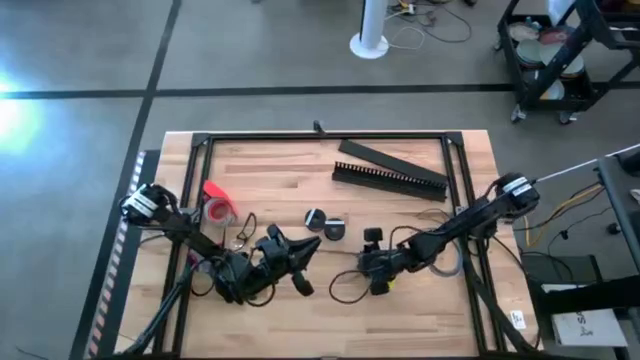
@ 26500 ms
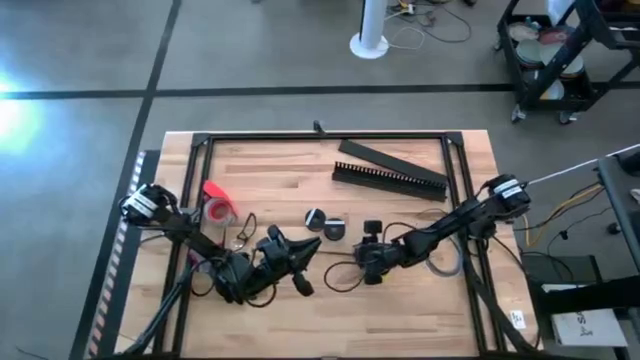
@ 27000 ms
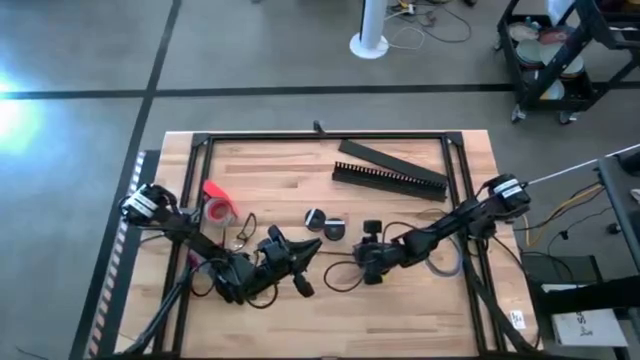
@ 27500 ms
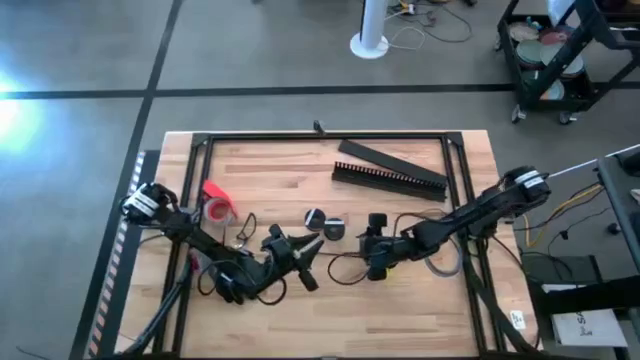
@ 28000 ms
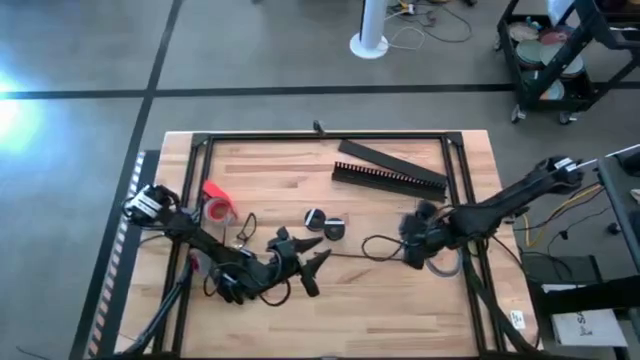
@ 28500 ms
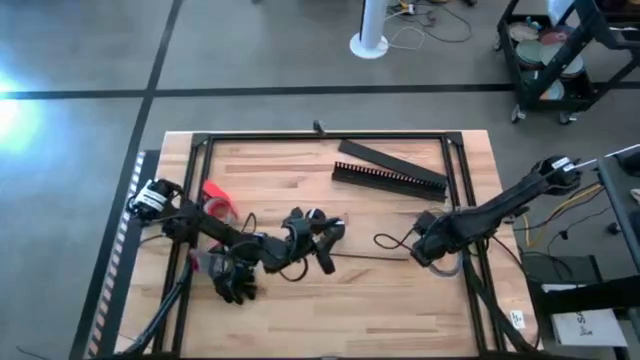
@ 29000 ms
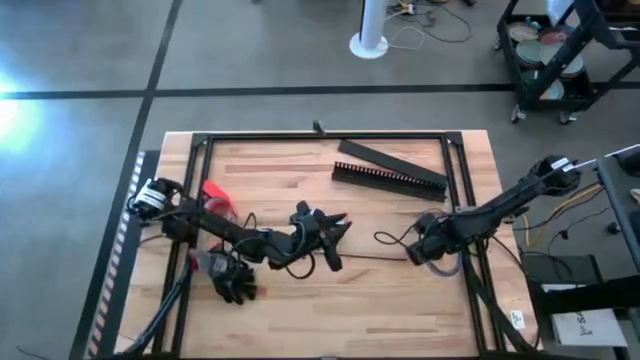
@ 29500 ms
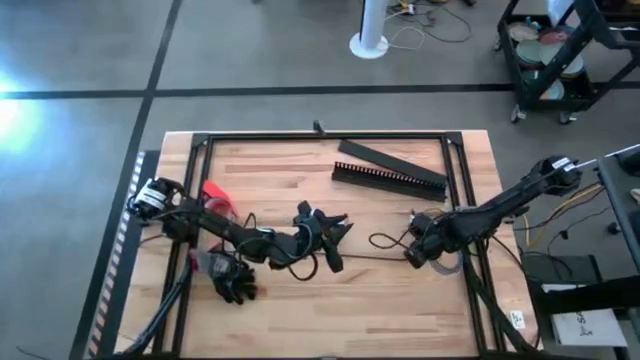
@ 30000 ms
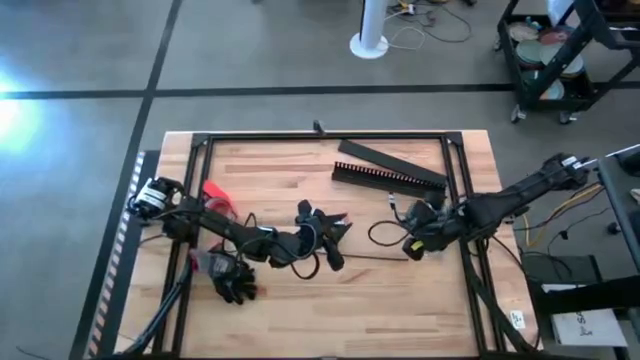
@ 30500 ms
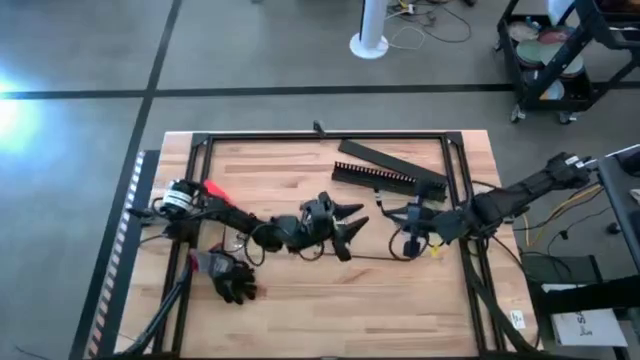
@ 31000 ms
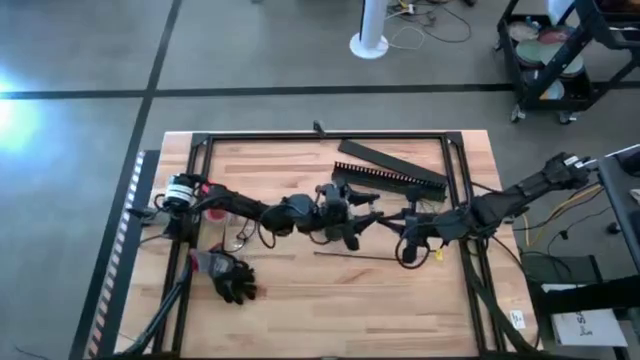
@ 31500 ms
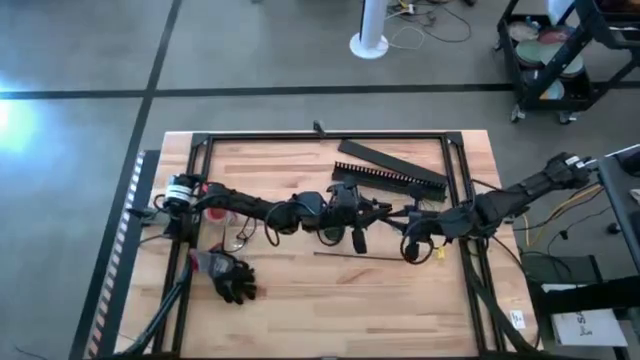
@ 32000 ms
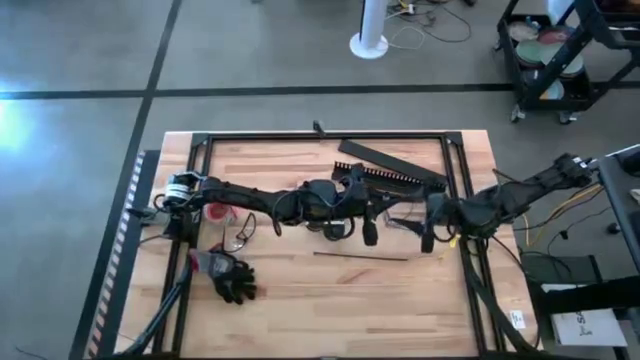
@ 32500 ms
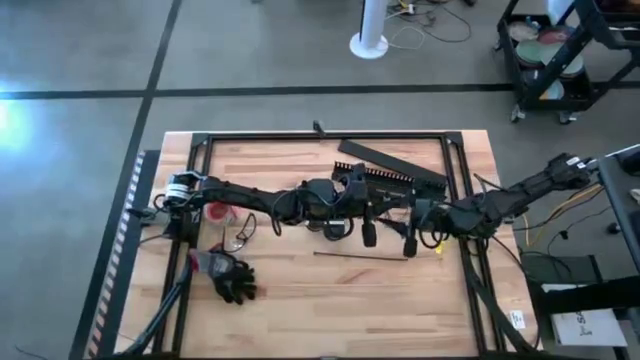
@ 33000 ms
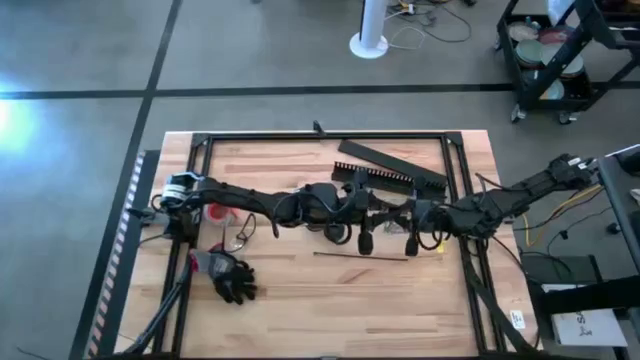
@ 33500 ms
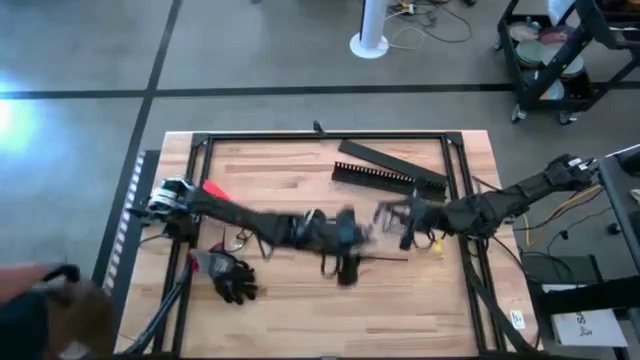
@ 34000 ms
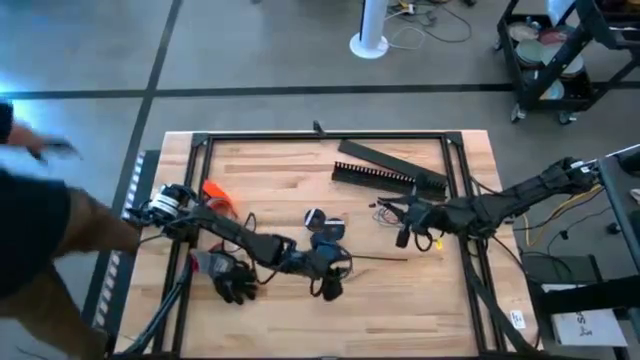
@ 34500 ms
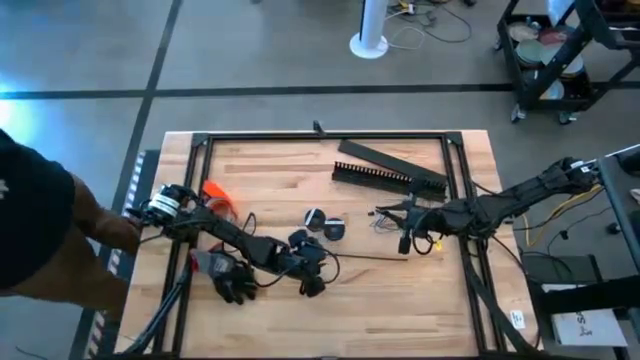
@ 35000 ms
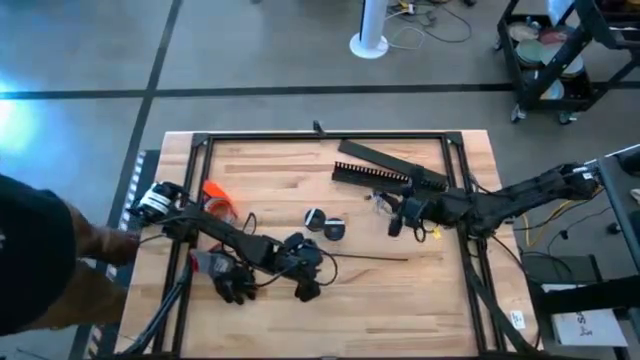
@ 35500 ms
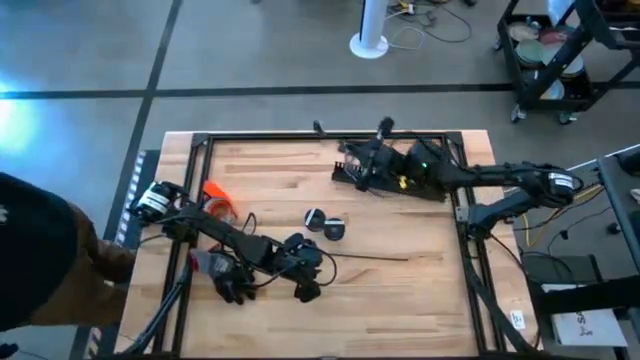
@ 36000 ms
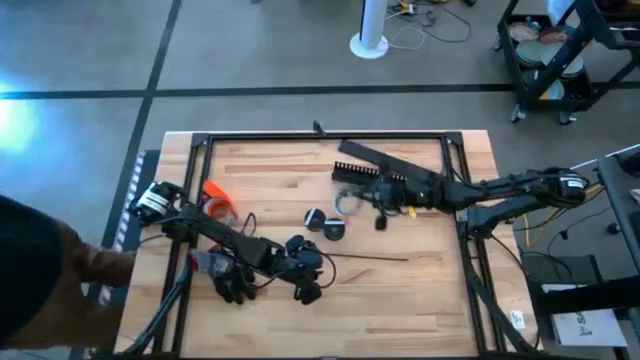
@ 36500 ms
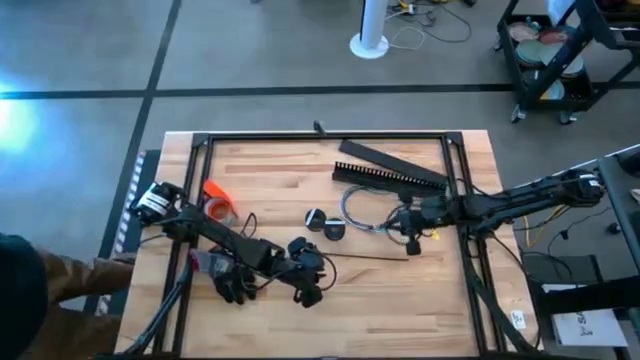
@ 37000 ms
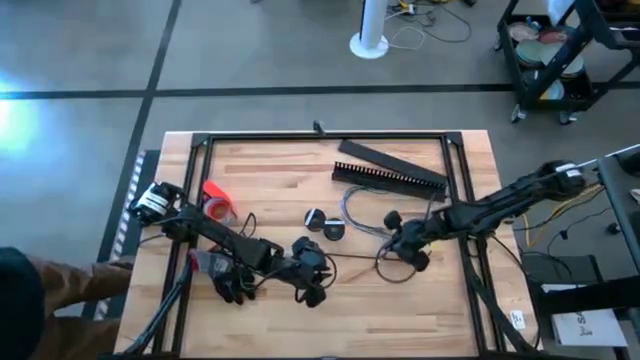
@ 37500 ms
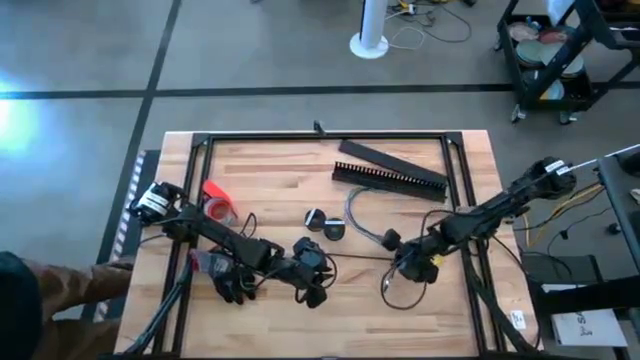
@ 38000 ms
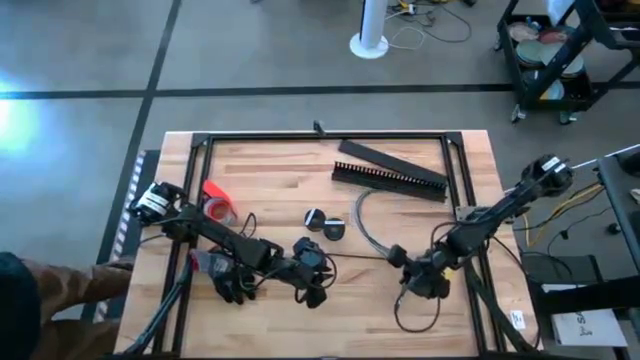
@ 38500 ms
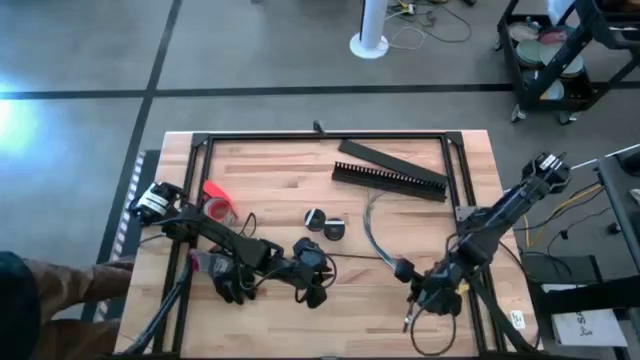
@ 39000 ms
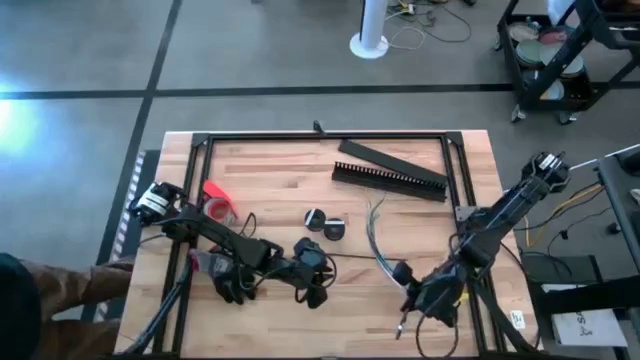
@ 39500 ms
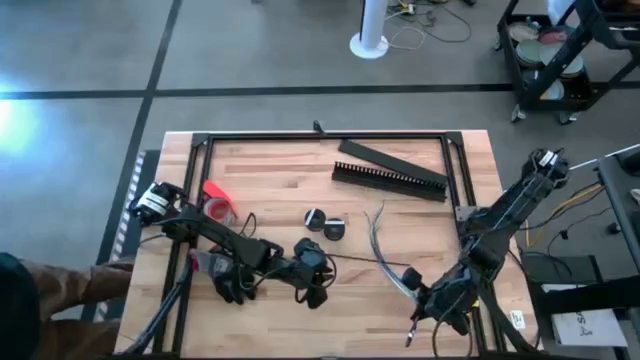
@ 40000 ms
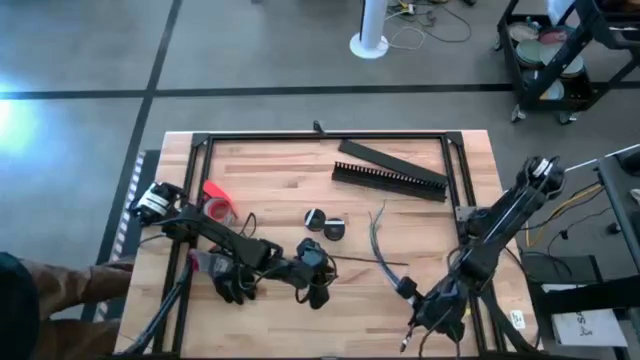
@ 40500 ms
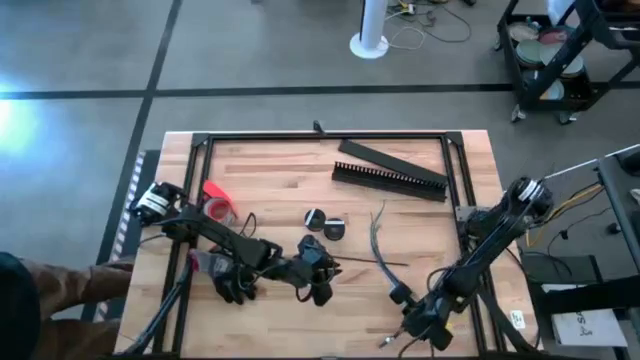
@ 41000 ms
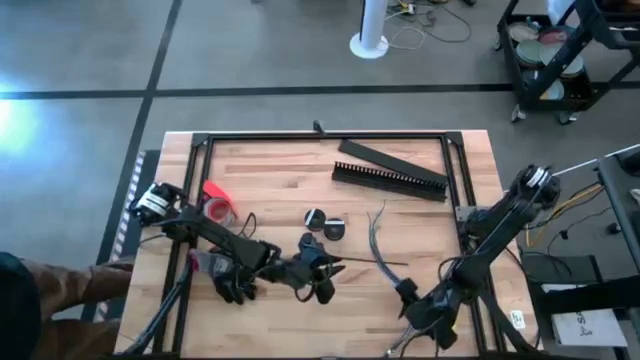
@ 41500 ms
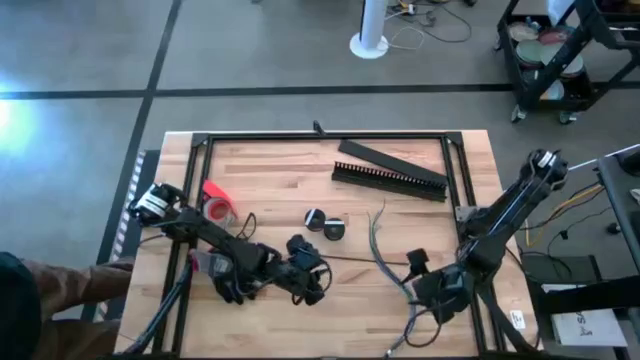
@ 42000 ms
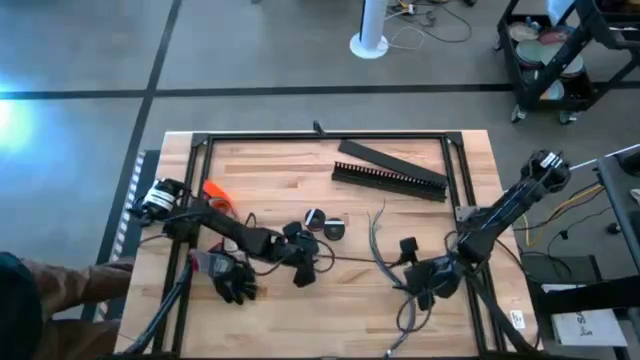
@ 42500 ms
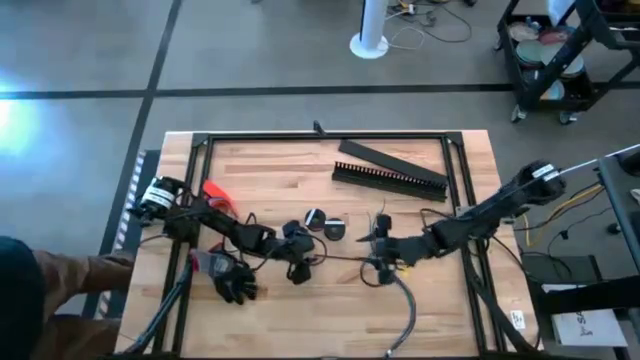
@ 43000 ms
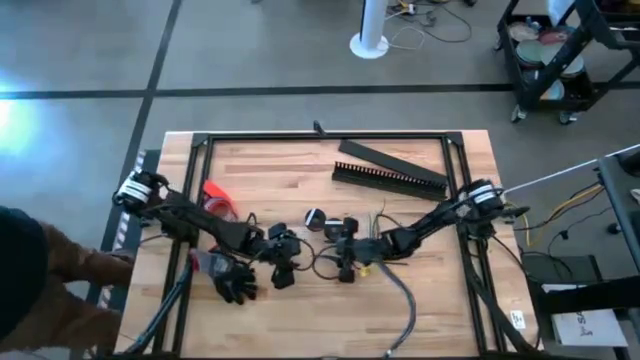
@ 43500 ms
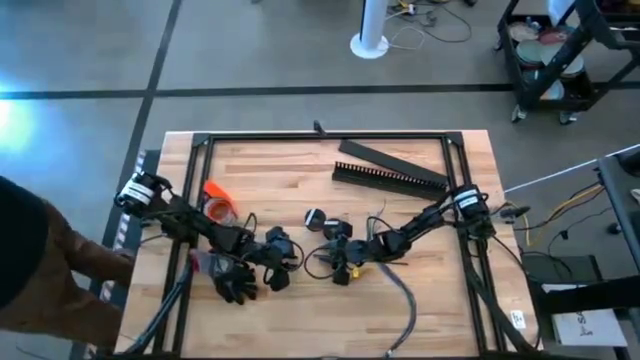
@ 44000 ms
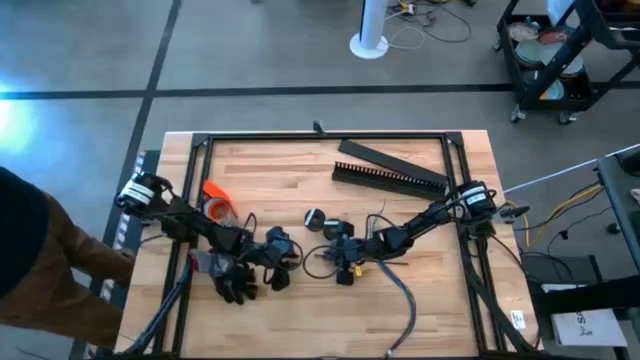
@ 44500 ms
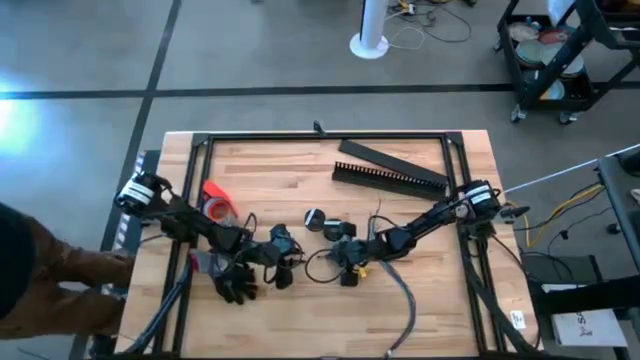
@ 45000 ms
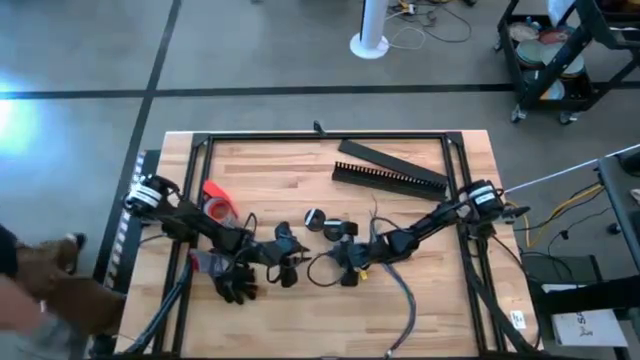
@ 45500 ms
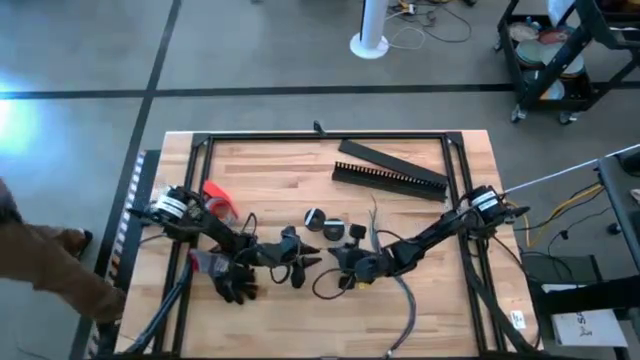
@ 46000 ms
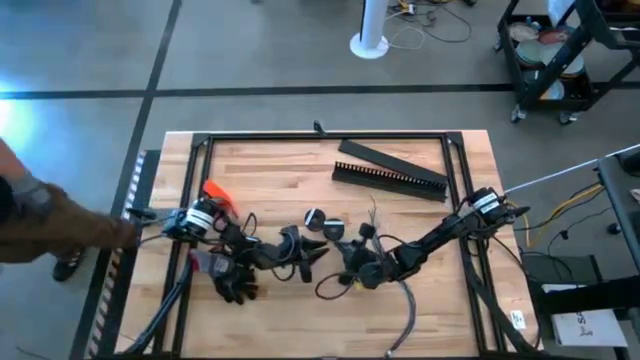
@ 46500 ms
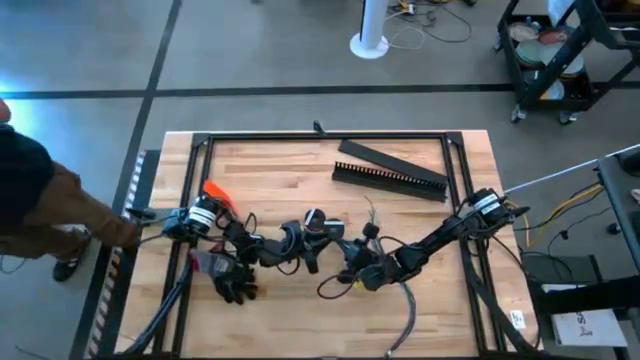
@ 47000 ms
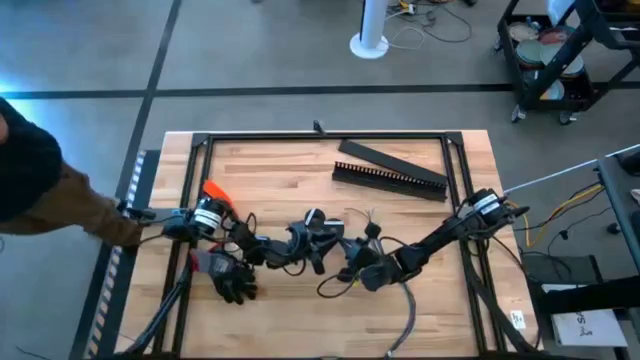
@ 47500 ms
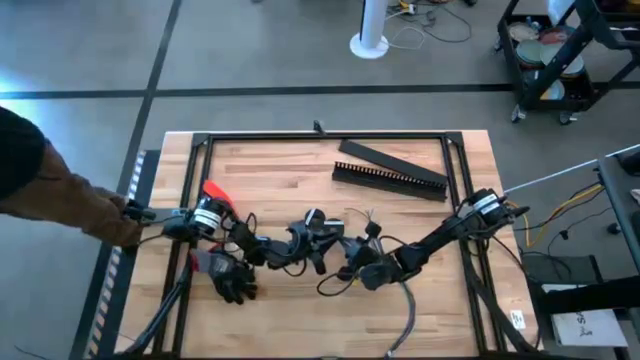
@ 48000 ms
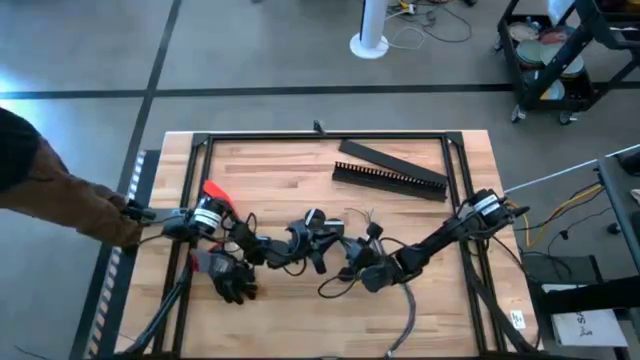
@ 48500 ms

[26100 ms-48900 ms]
Task: Ziptie cables
Wrap the black zip tie on the cables
